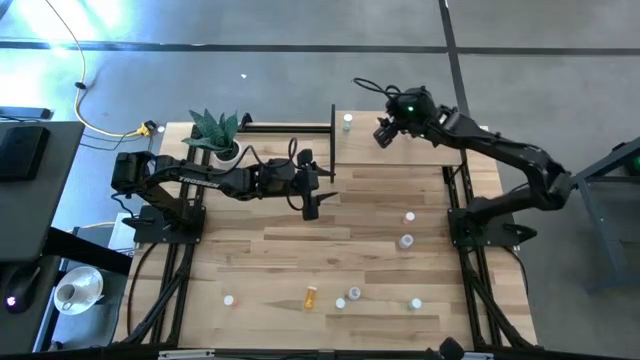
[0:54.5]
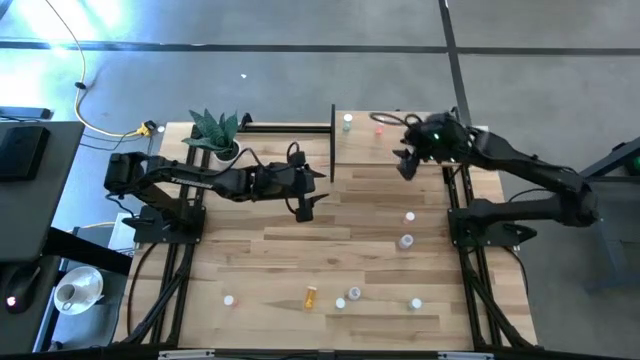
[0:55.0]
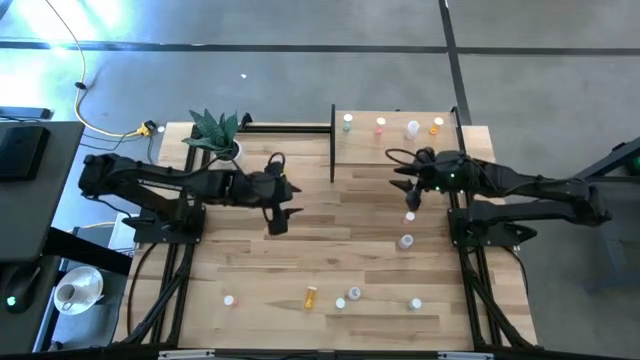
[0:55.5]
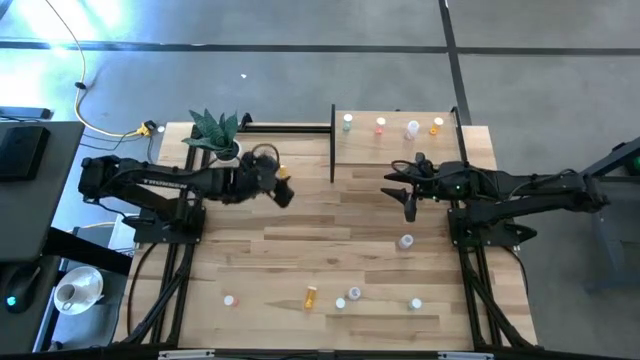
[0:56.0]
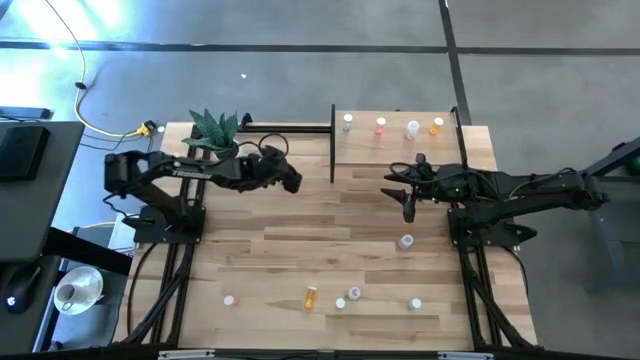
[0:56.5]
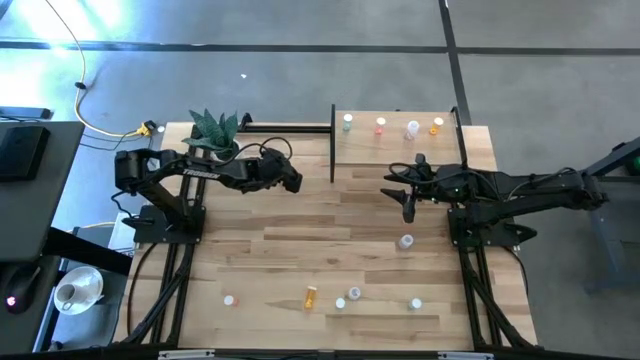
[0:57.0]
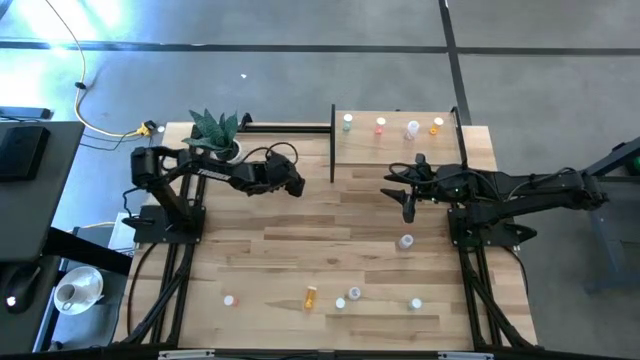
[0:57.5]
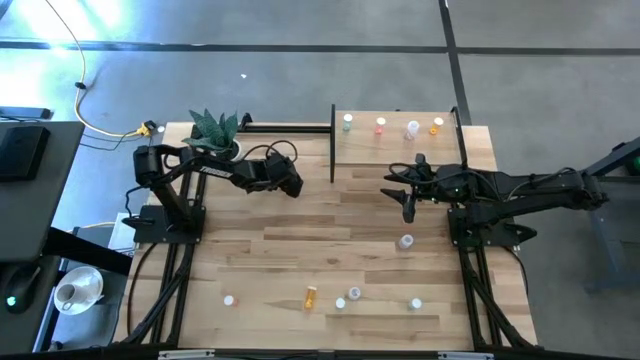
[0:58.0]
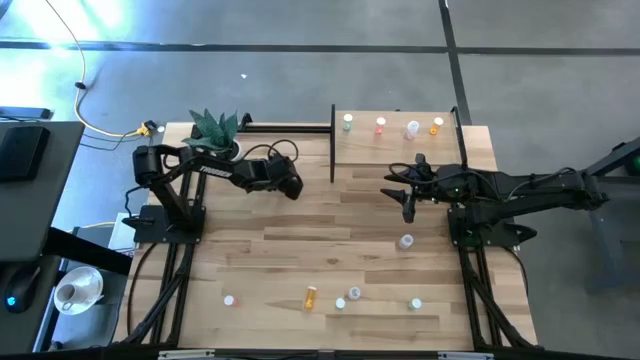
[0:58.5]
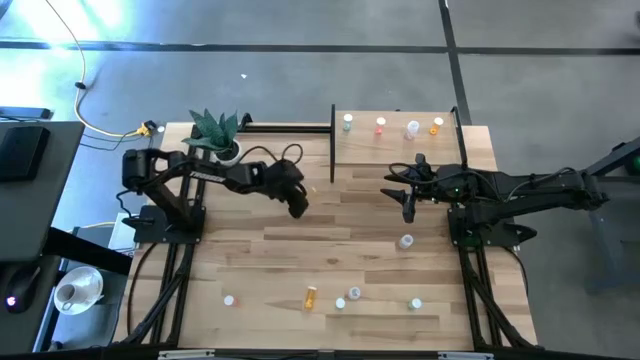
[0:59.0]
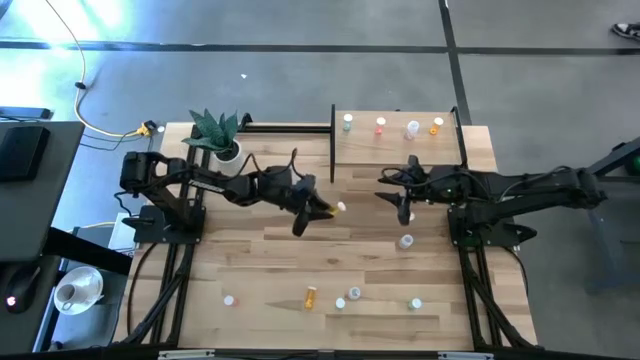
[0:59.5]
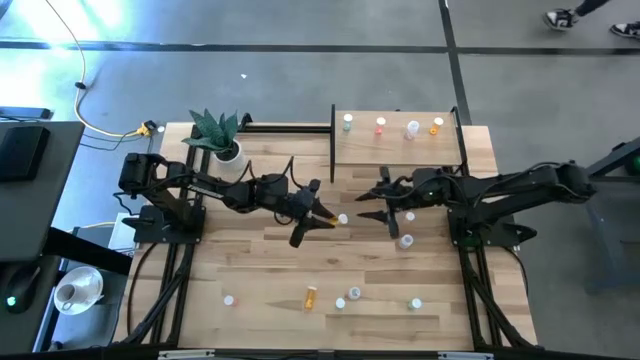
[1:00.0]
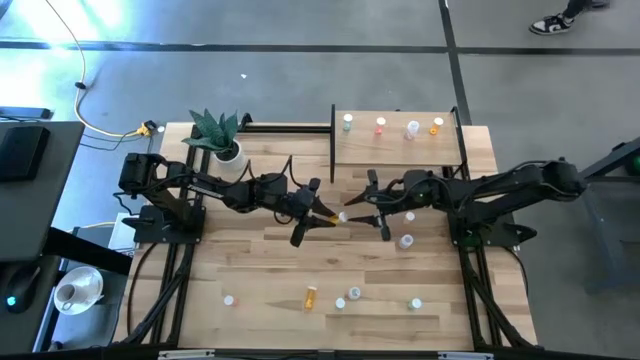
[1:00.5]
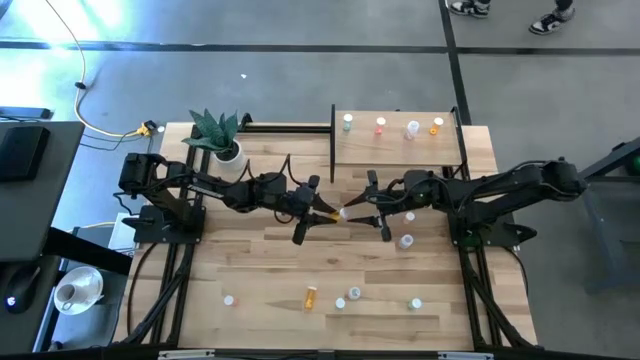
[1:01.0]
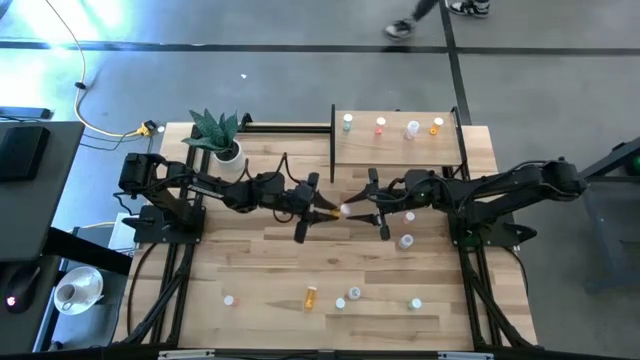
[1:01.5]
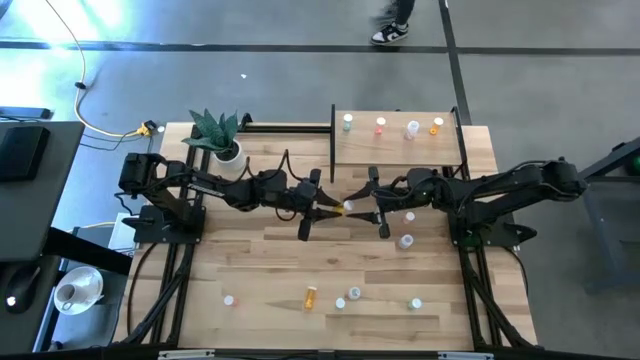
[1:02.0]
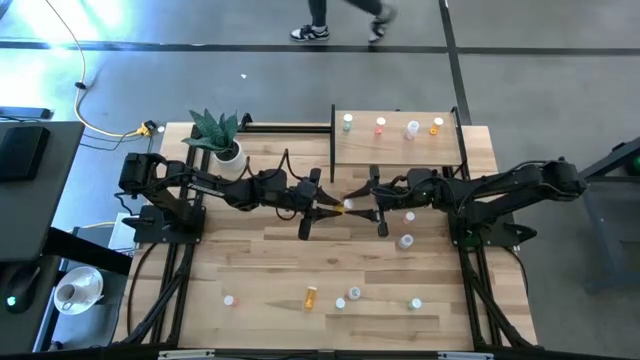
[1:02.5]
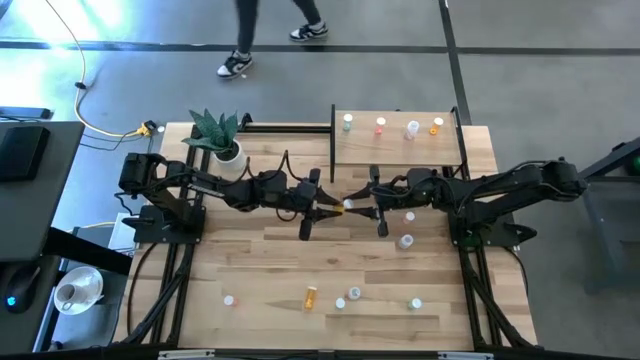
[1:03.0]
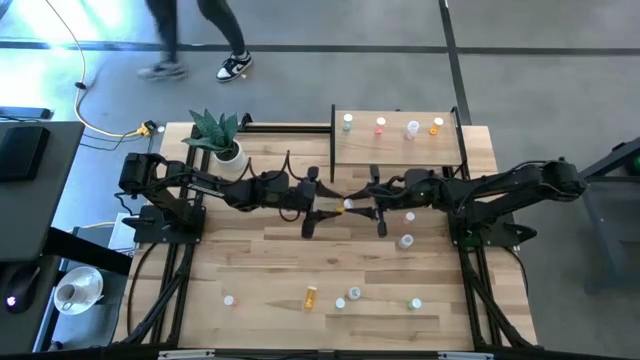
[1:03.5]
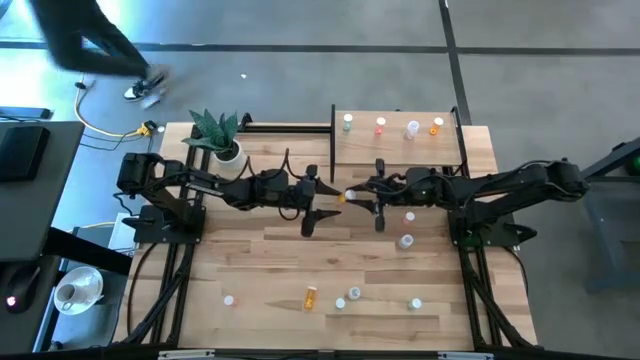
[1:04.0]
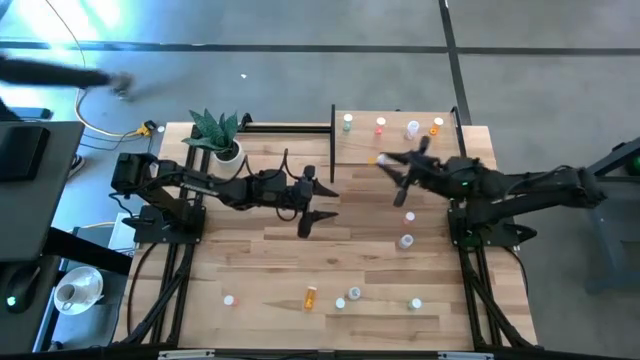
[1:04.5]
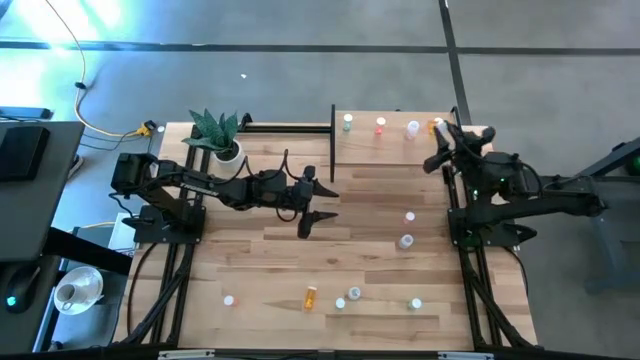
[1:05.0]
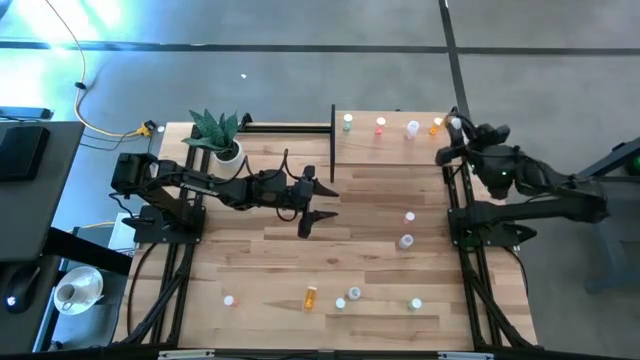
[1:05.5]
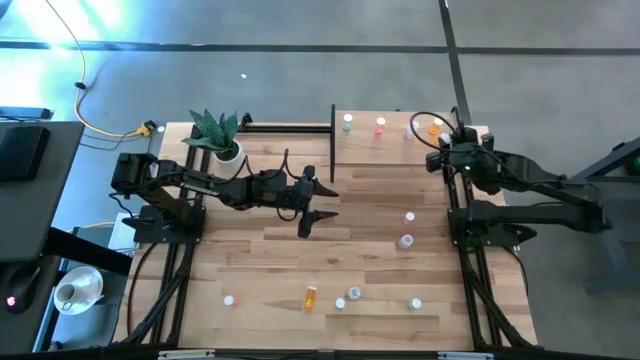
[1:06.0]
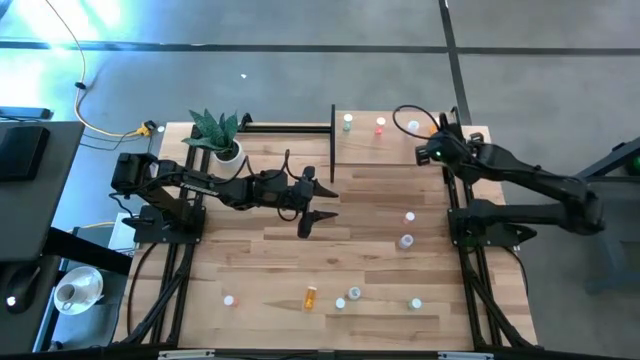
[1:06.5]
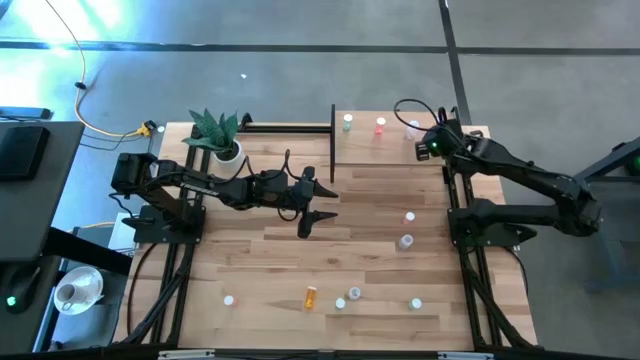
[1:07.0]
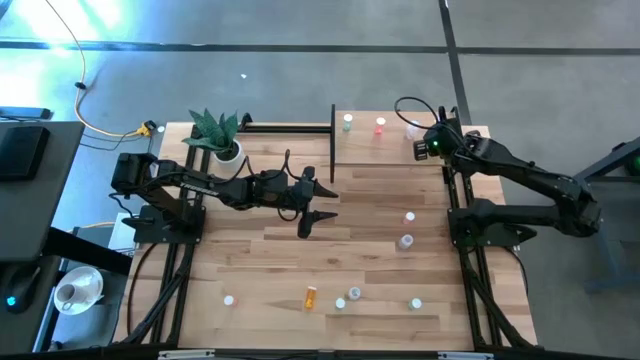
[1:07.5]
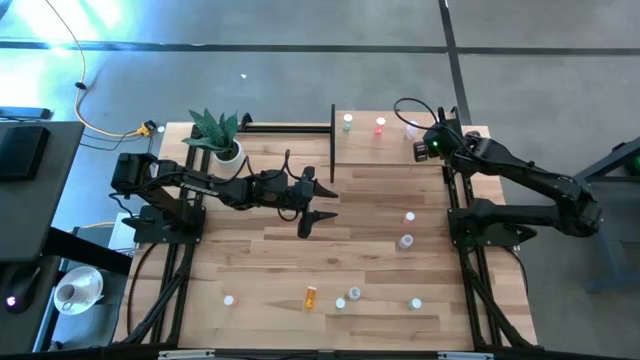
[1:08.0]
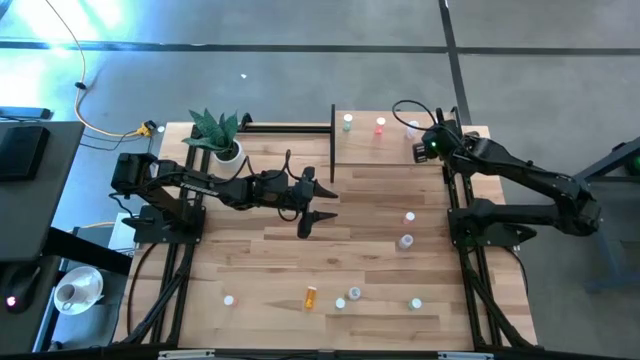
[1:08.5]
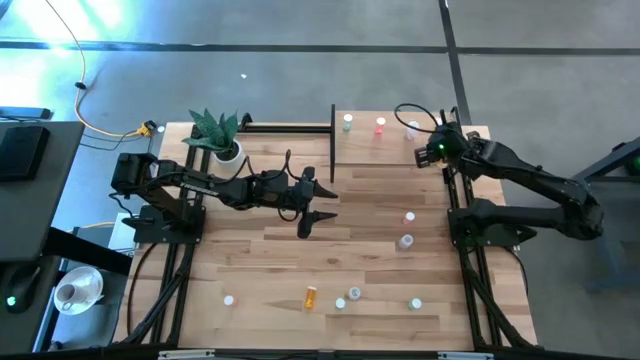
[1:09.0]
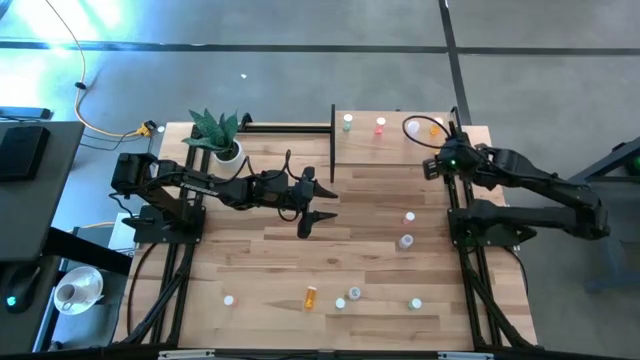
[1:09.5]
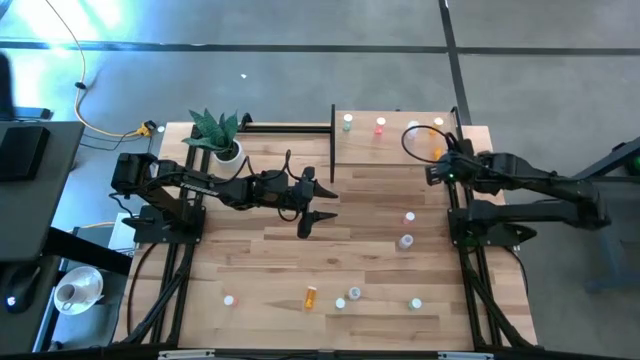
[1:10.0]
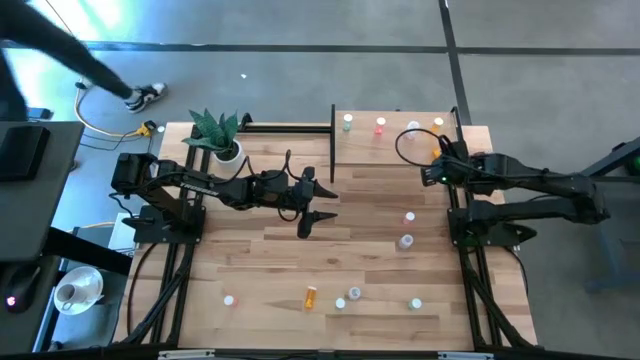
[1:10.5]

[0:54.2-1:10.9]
Task: Pick and place medicine bottles onto shelf by color
Put the top yellow pill bottle on the shelf aligned with the other yellow pill bottle

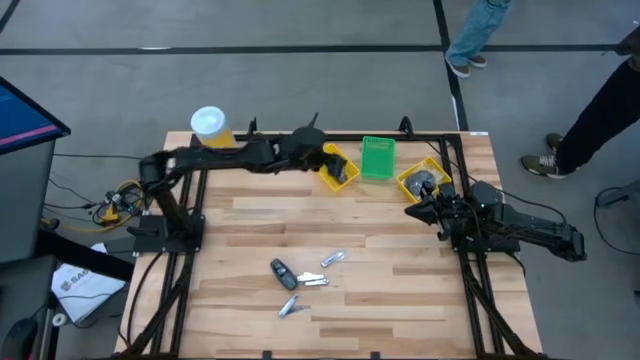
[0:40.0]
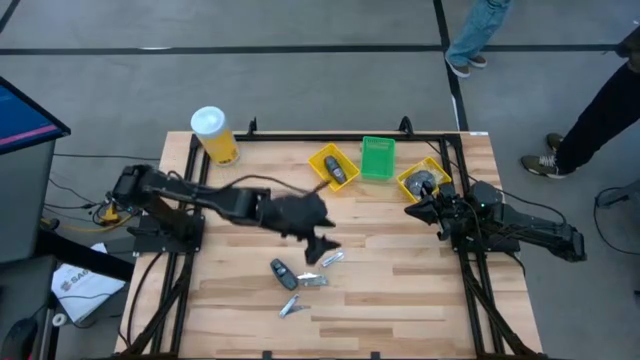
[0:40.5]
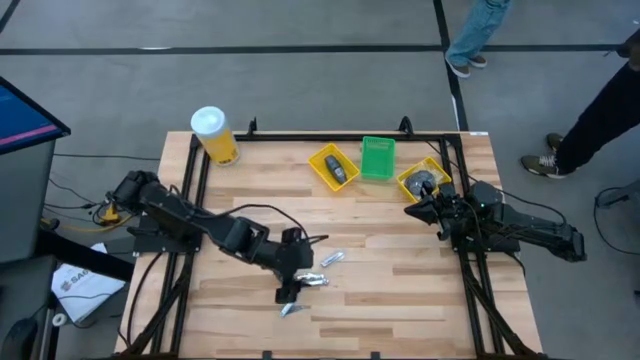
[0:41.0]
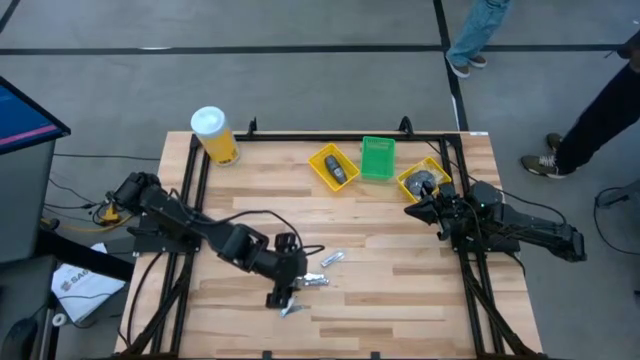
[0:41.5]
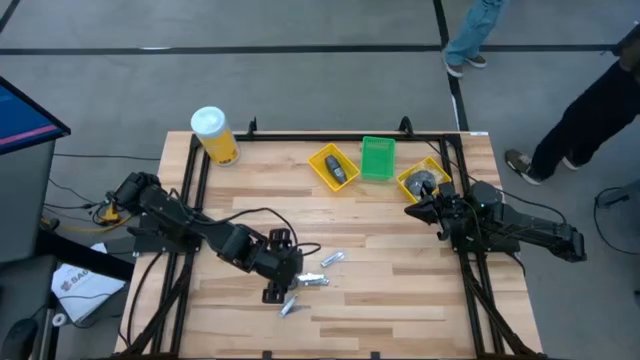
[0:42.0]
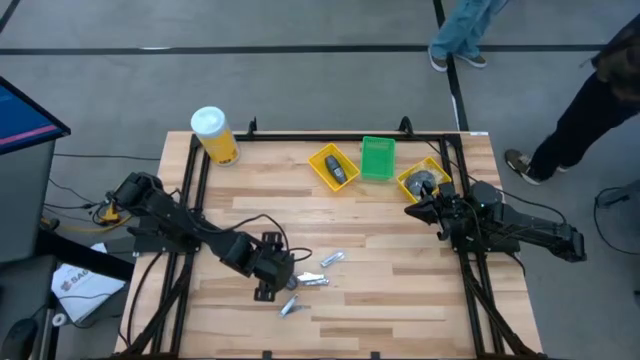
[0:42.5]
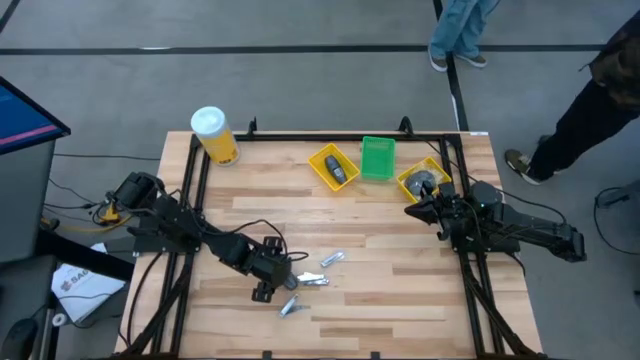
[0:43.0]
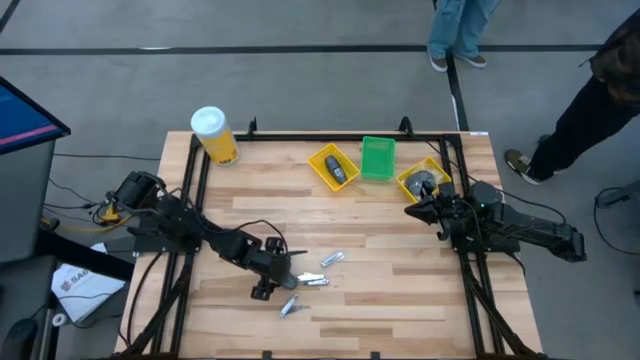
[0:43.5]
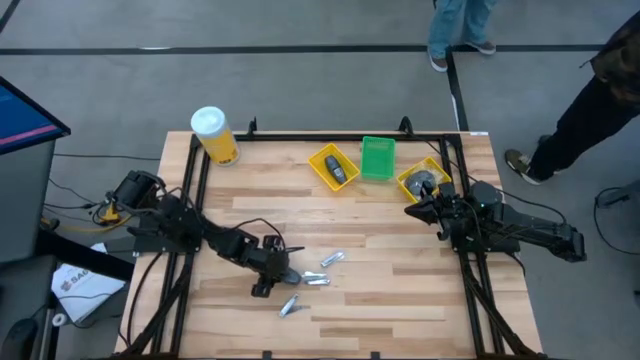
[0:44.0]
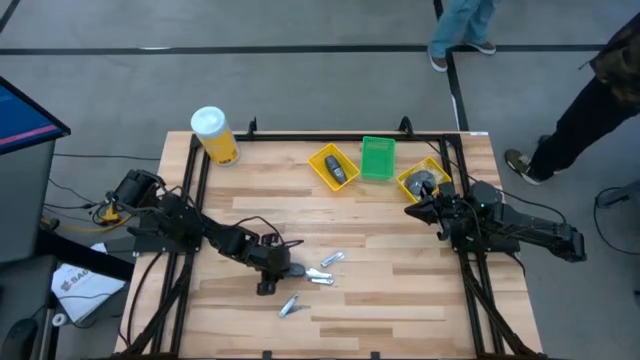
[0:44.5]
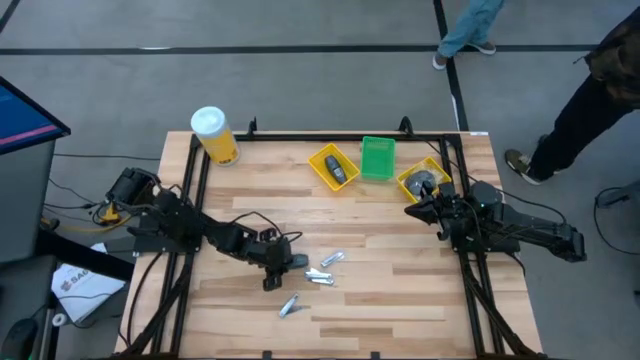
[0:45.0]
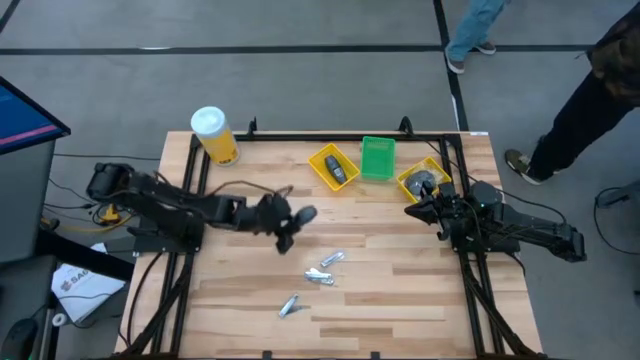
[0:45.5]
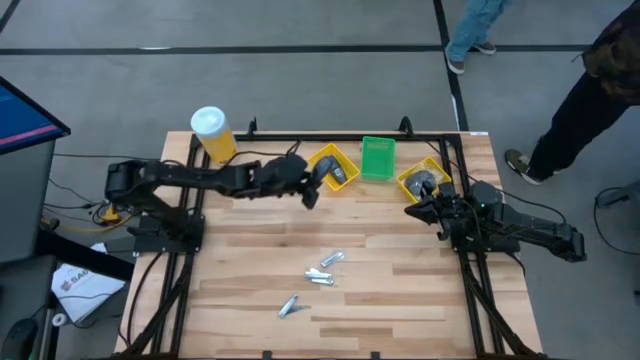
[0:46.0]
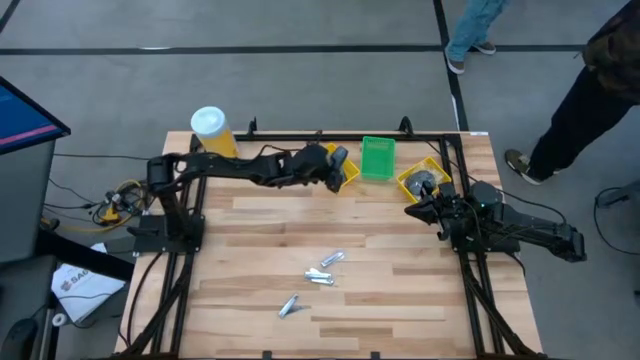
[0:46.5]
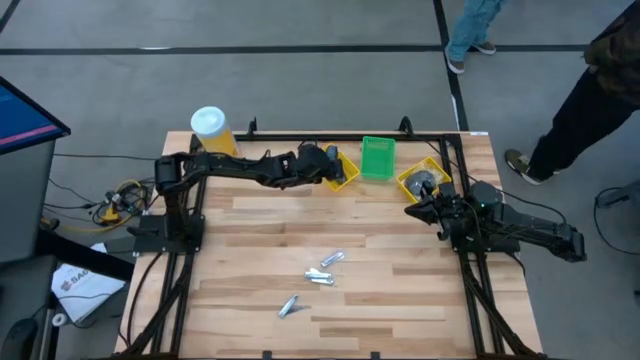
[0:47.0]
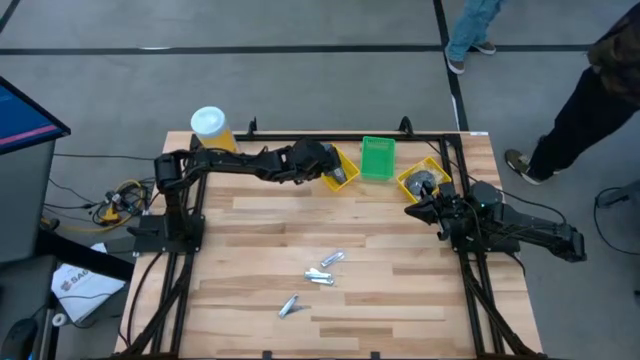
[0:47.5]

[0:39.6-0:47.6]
Task: Pick & Place Travel size toiletries
Put the black deodorant into the left yellow basket
